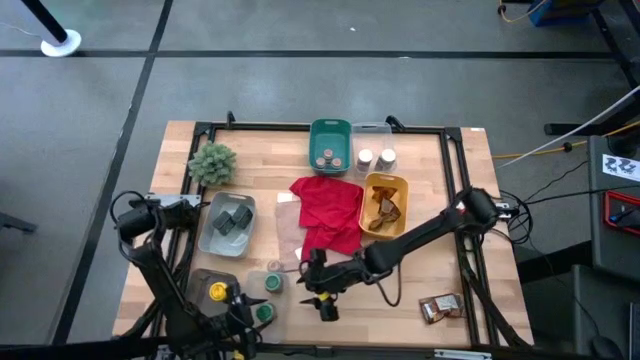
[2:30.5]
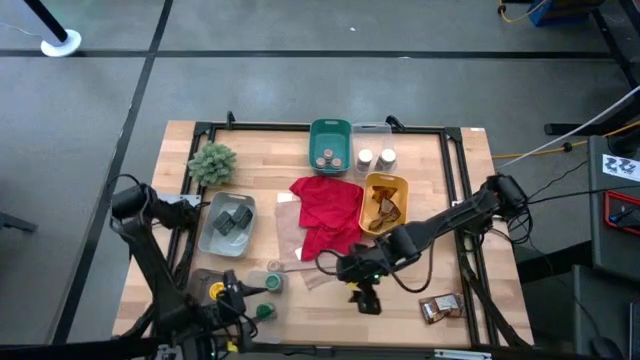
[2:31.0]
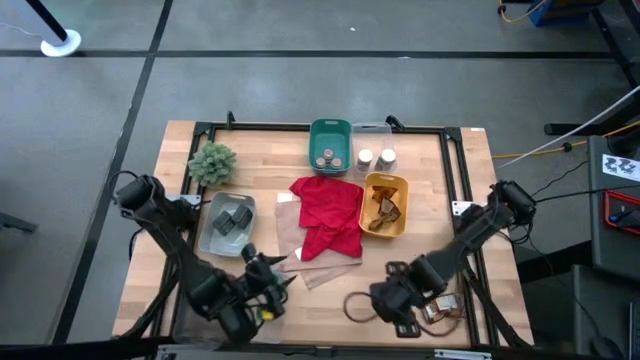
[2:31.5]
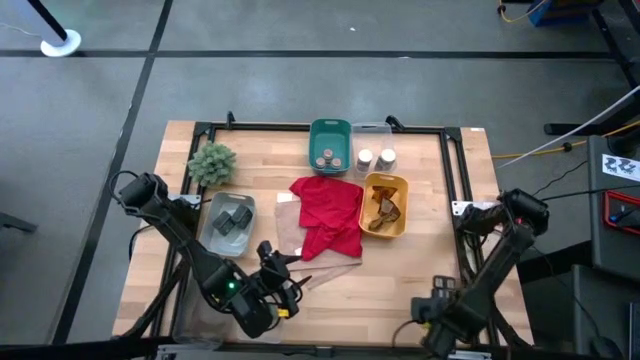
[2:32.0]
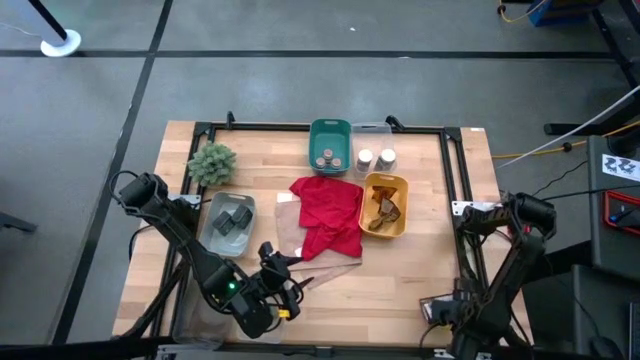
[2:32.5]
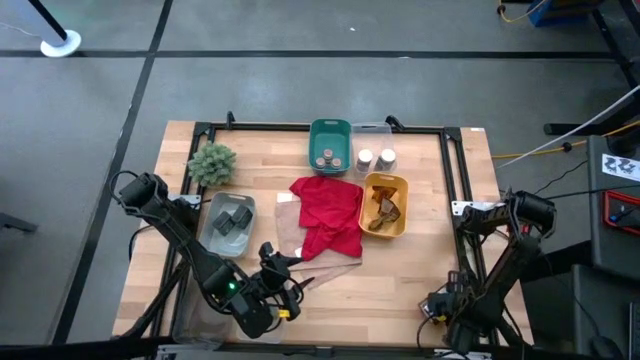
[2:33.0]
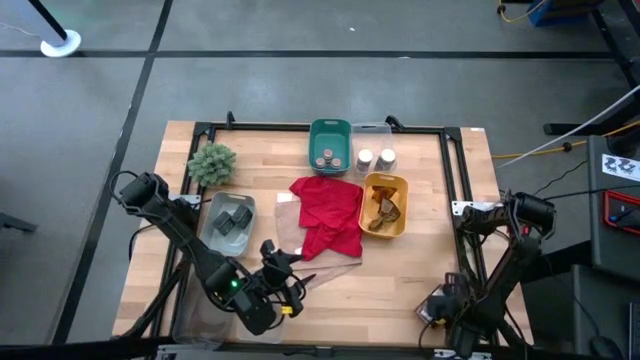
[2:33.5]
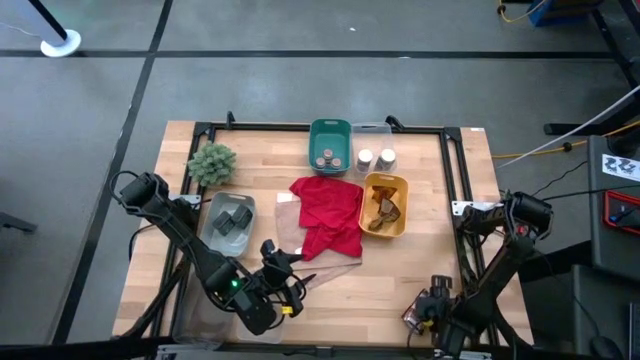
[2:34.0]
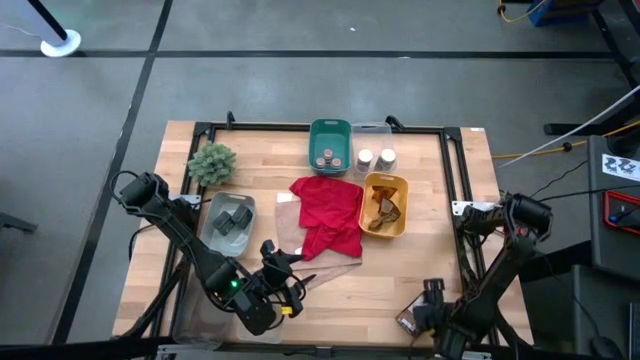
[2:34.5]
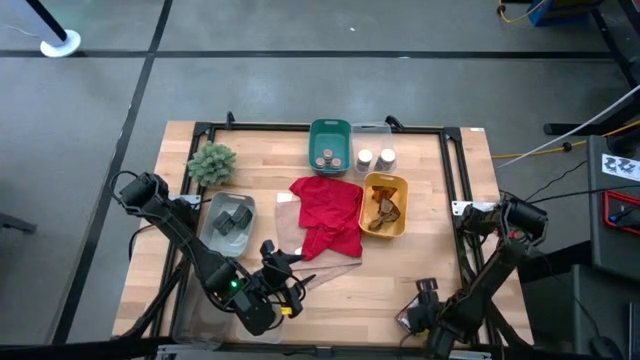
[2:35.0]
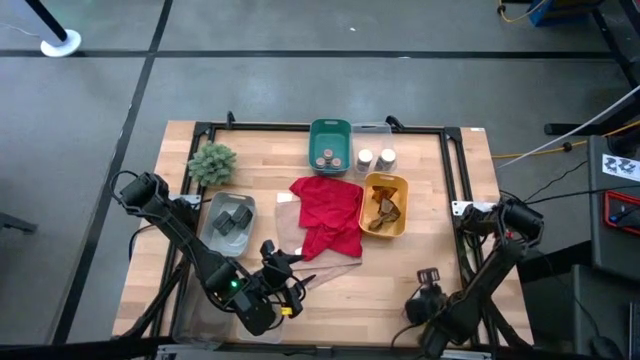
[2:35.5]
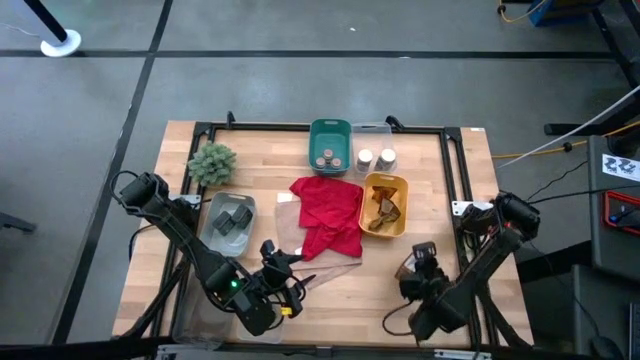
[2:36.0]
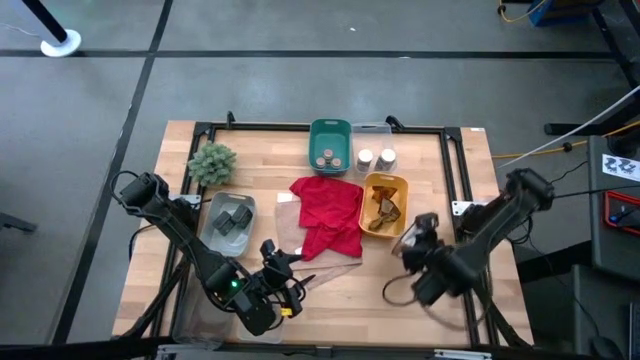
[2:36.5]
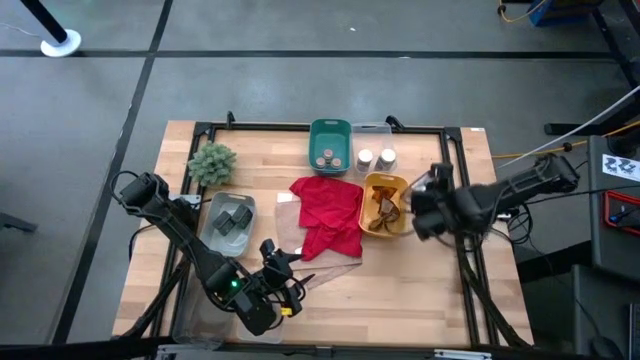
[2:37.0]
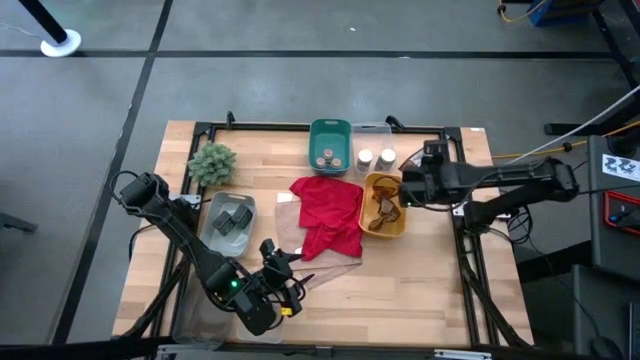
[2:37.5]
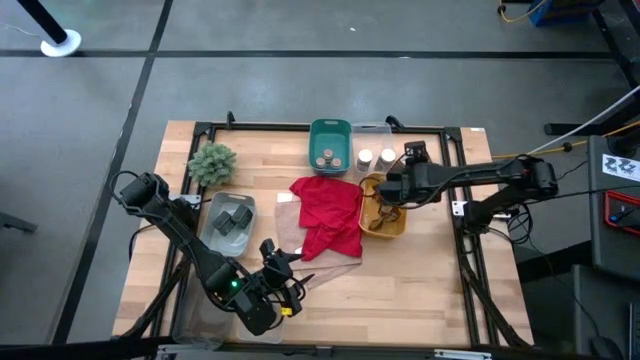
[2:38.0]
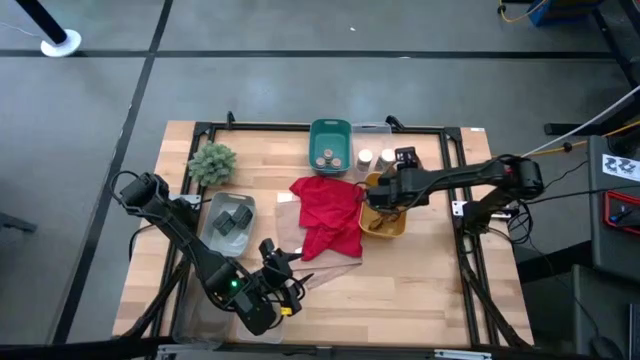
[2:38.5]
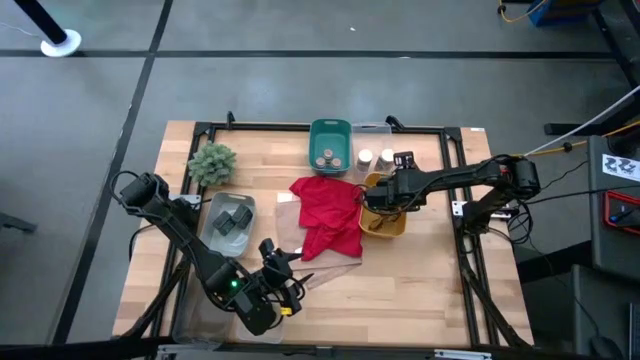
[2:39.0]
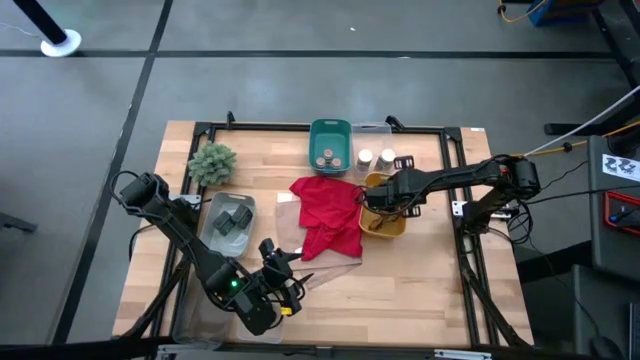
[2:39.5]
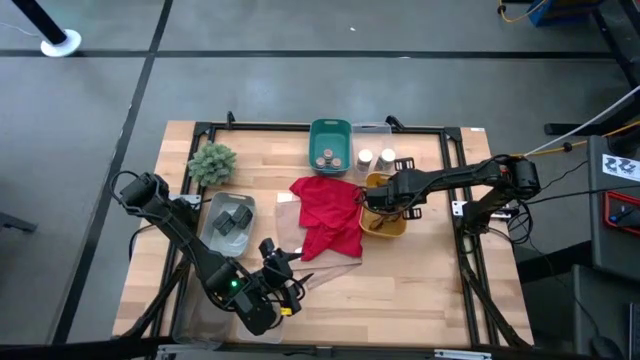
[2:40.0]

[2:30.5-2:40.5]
Task: Sort spices by type
Put the brown seasoning sachet into the yellow bin

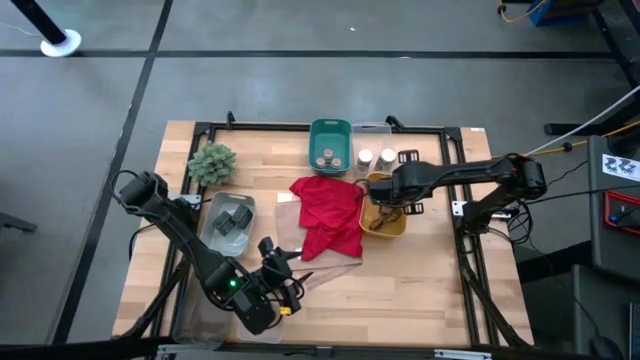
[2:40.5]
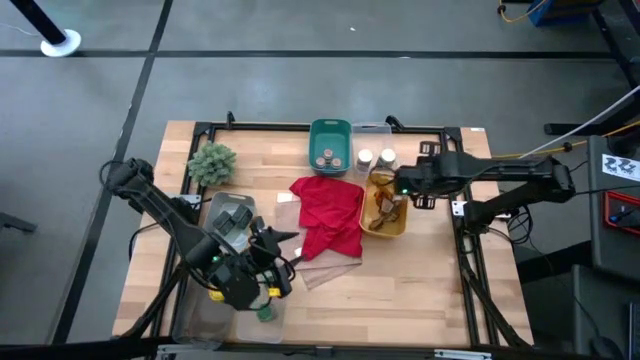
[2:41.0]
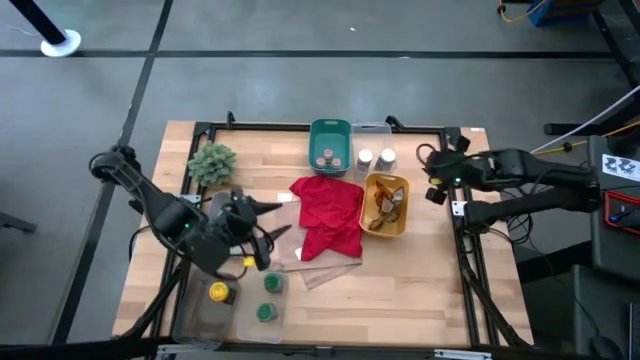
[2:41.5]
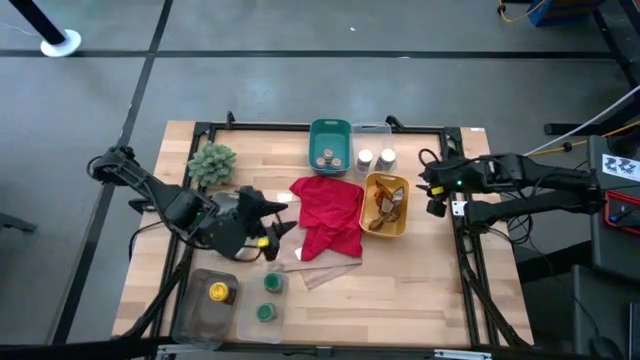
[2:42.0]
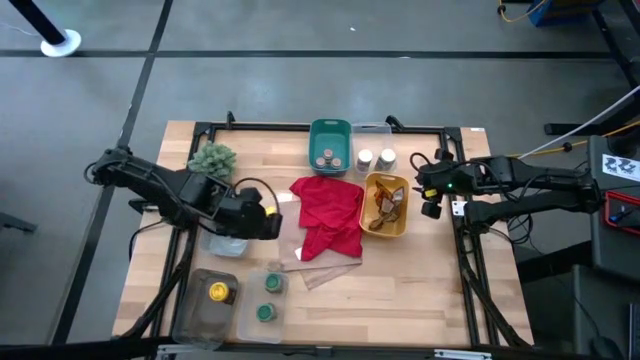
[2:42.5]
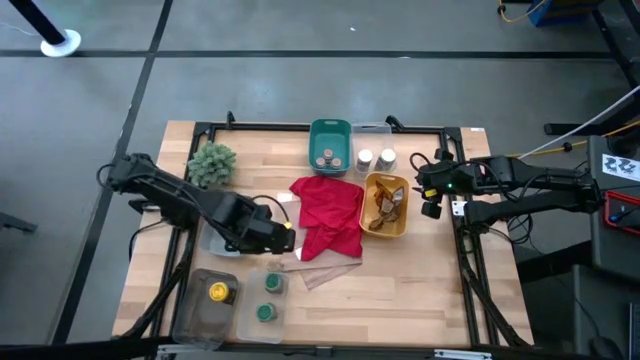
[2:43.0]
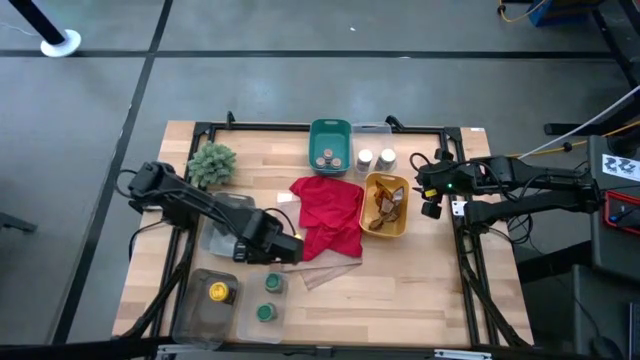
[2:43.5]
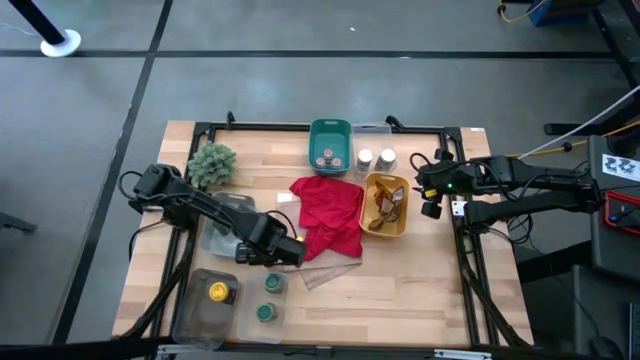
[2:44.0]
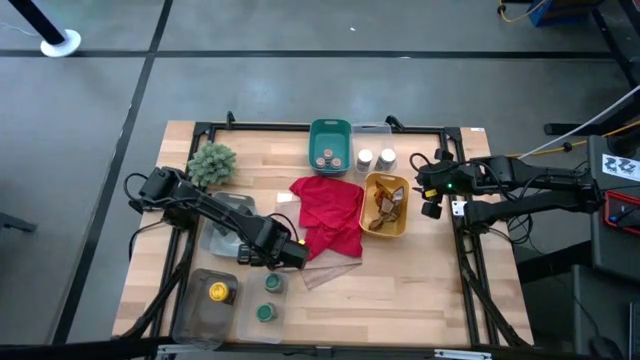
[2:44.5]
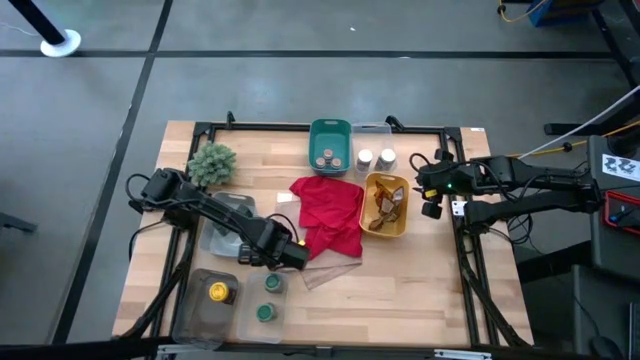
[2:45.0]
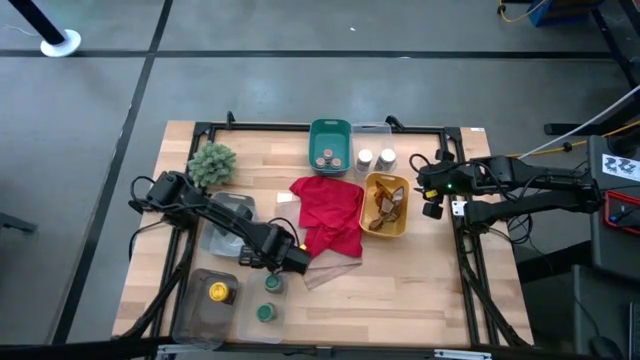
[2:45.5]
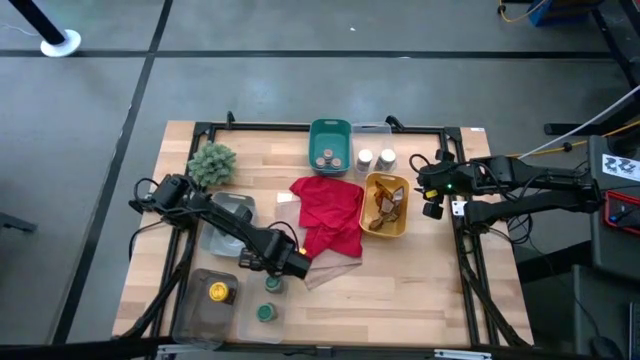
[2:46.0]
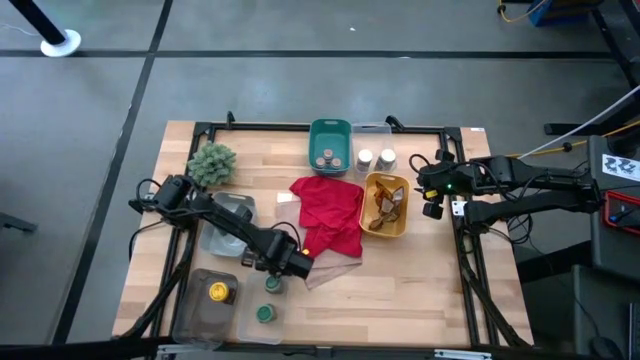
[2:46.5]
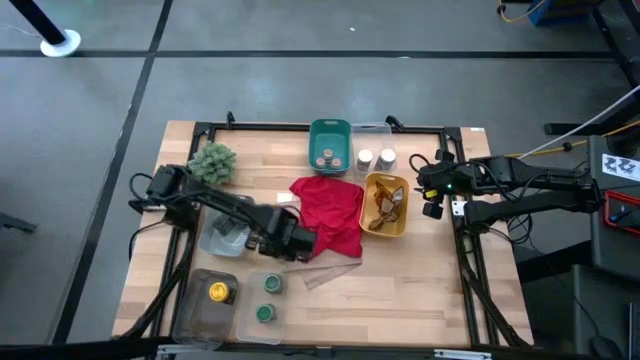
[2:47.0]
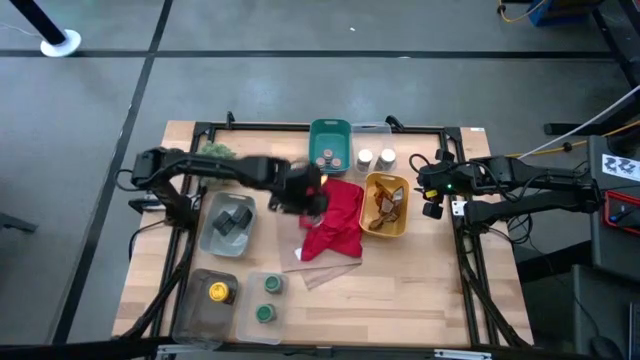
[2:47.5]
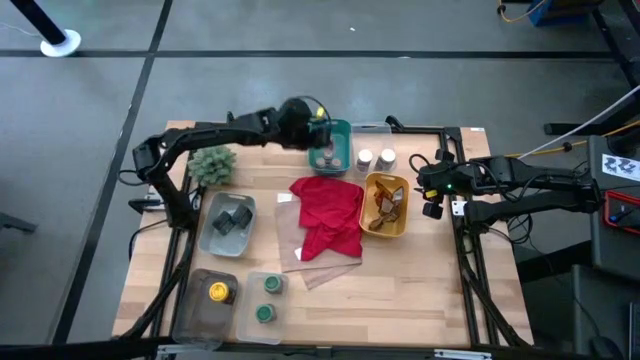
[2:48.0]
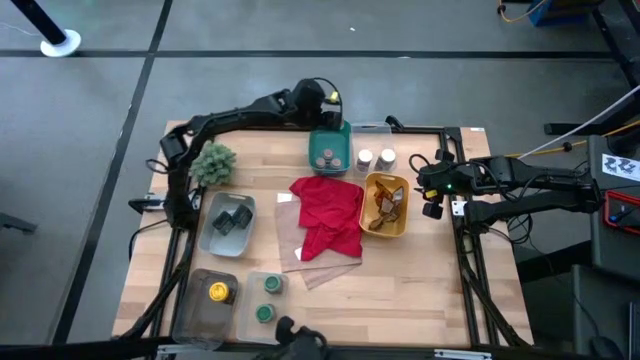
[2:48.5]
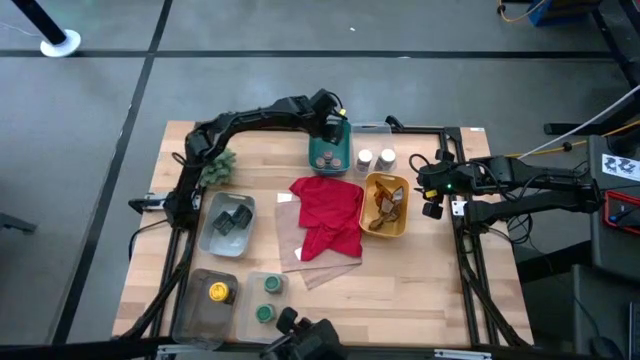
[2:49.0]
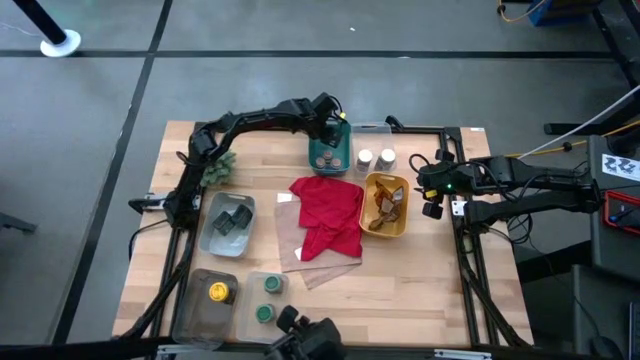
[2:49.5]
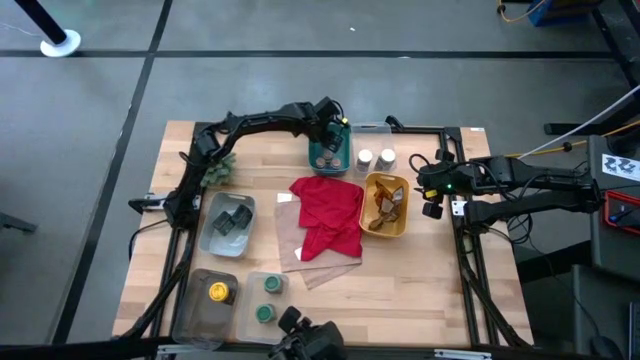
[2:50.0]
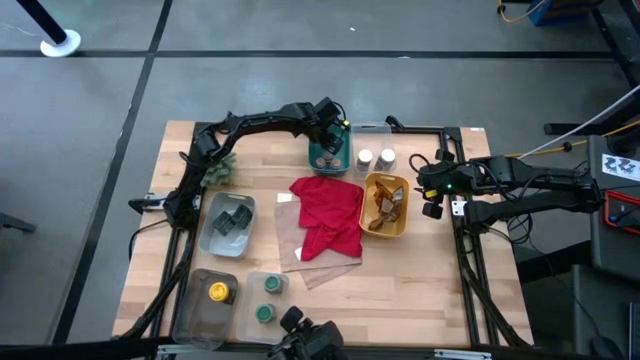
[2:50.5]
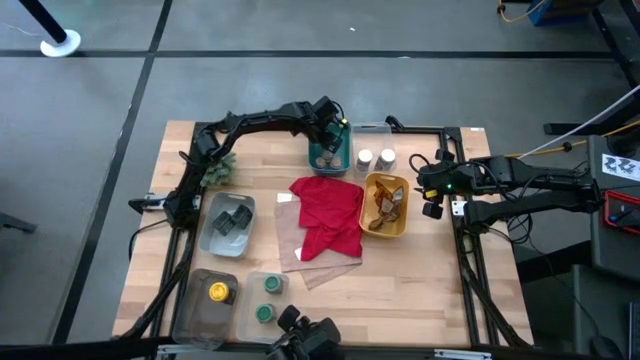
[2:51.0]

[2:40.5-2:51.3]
Put the brown seasoning bottle into the green bin
